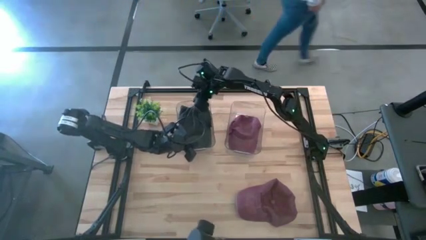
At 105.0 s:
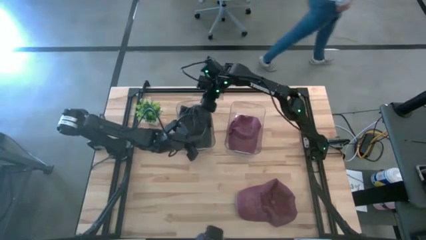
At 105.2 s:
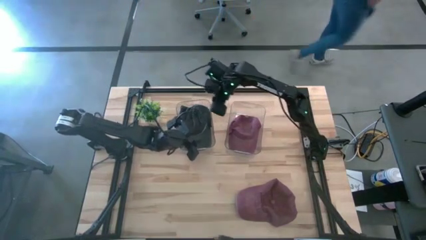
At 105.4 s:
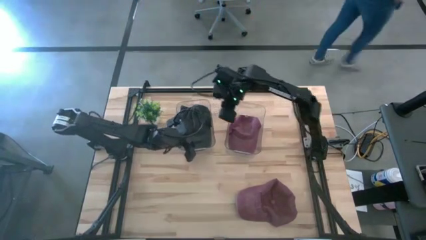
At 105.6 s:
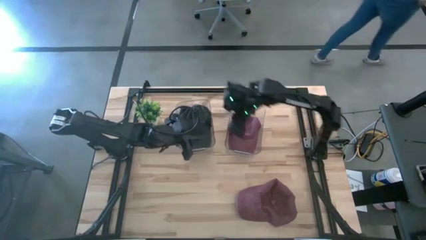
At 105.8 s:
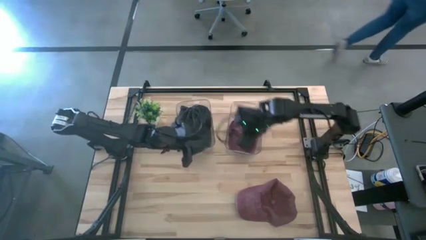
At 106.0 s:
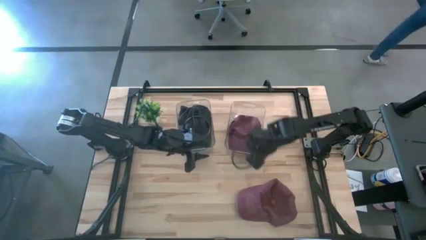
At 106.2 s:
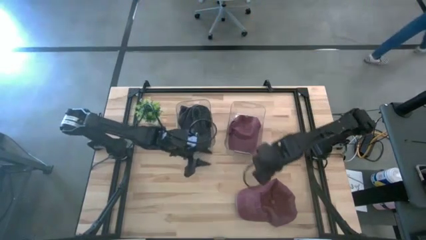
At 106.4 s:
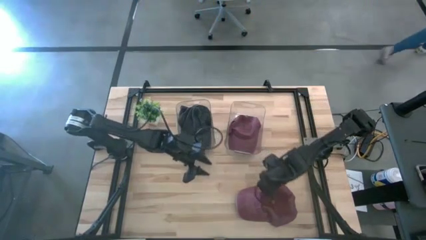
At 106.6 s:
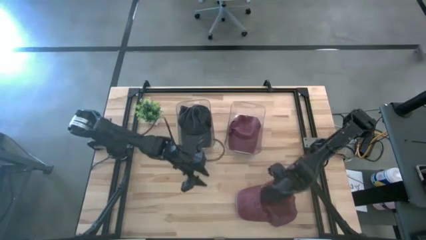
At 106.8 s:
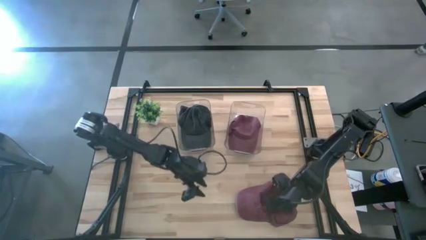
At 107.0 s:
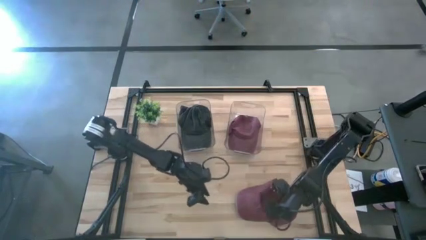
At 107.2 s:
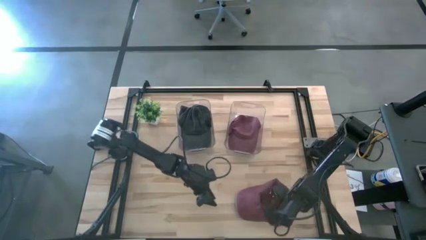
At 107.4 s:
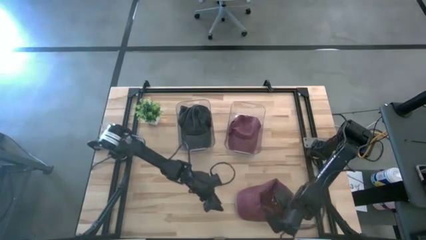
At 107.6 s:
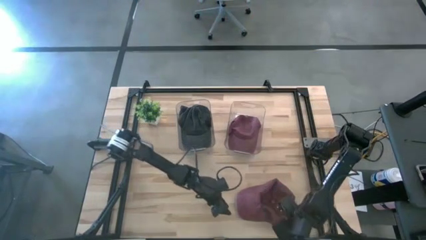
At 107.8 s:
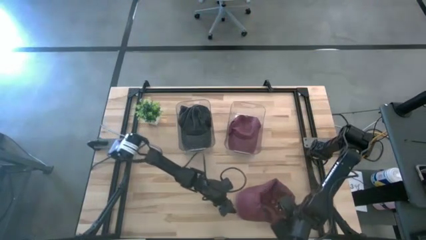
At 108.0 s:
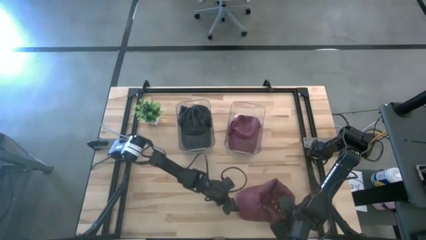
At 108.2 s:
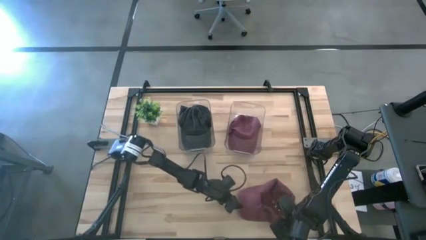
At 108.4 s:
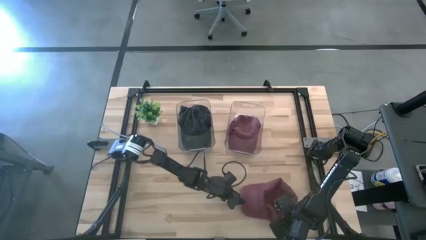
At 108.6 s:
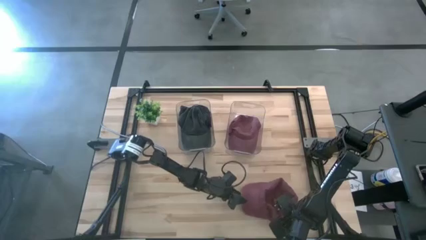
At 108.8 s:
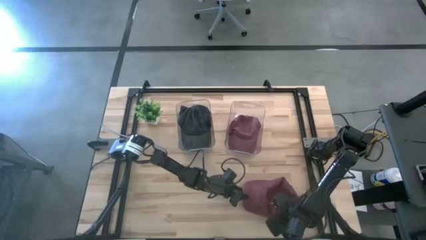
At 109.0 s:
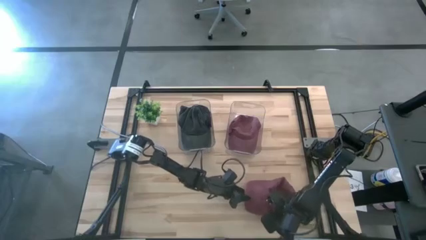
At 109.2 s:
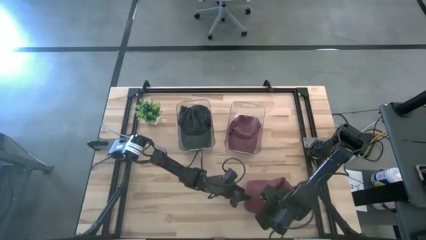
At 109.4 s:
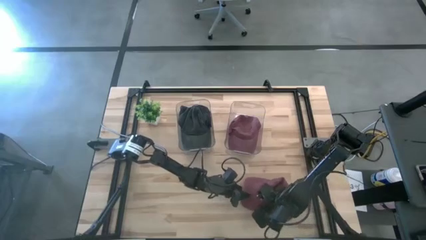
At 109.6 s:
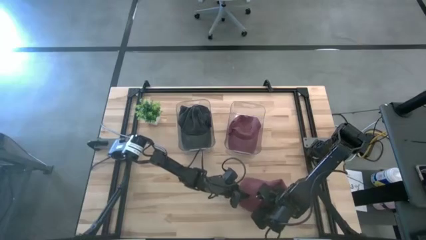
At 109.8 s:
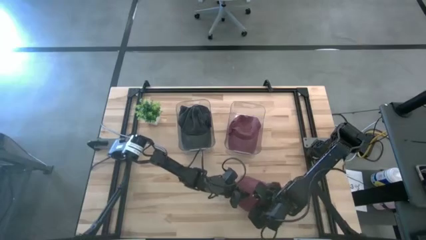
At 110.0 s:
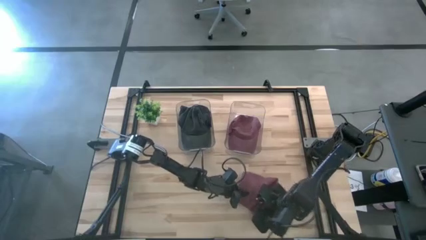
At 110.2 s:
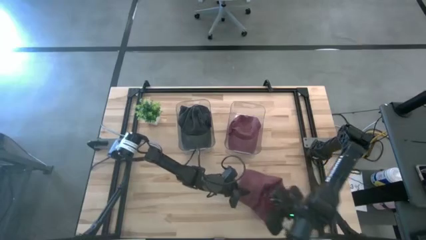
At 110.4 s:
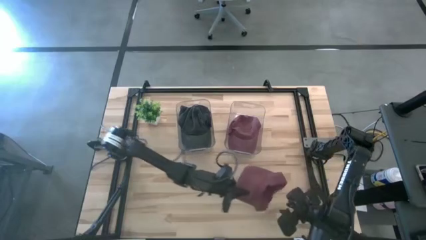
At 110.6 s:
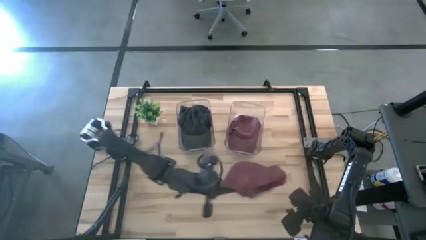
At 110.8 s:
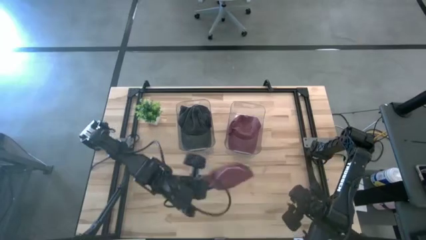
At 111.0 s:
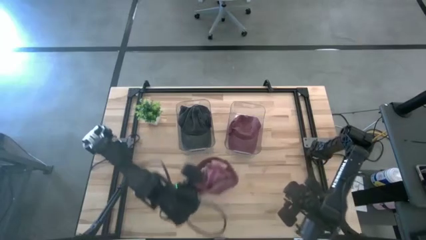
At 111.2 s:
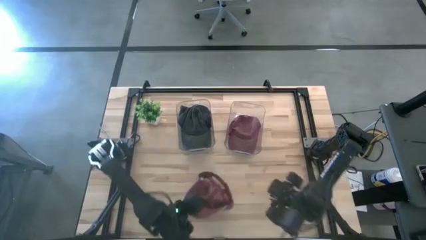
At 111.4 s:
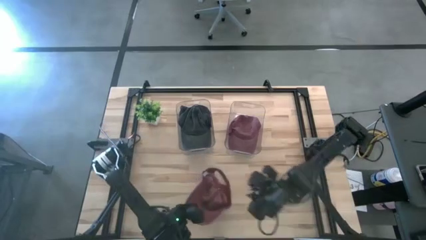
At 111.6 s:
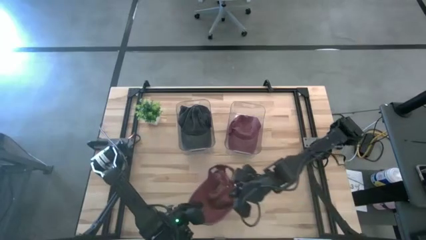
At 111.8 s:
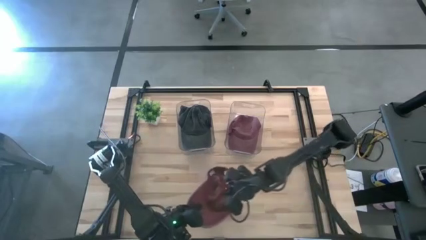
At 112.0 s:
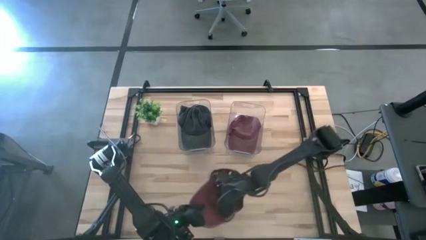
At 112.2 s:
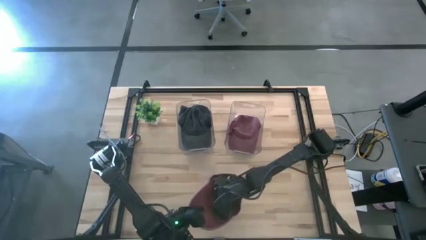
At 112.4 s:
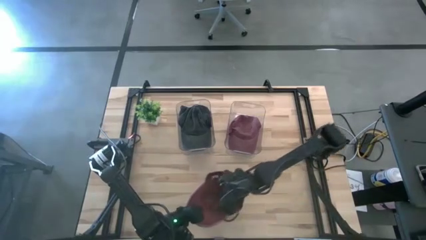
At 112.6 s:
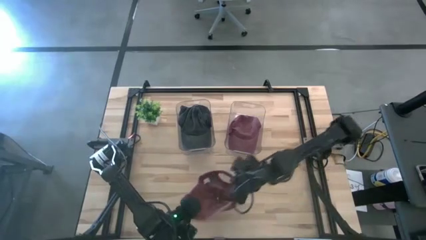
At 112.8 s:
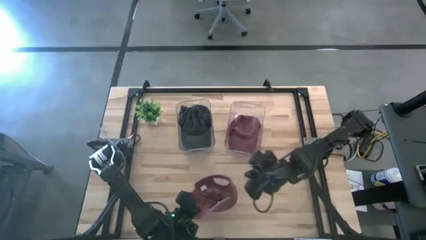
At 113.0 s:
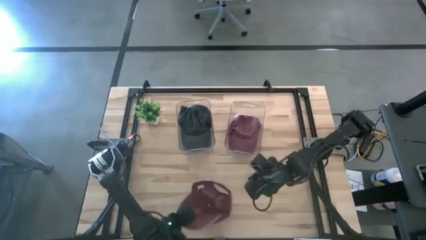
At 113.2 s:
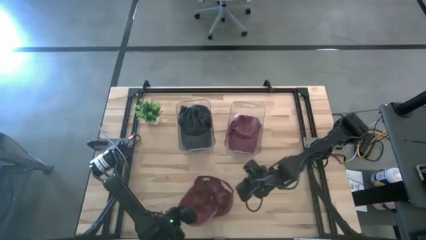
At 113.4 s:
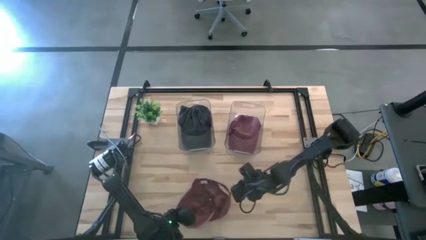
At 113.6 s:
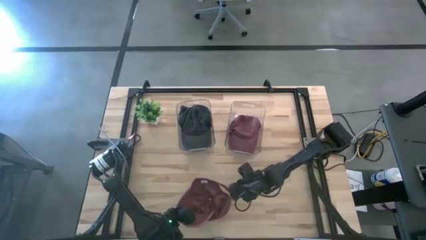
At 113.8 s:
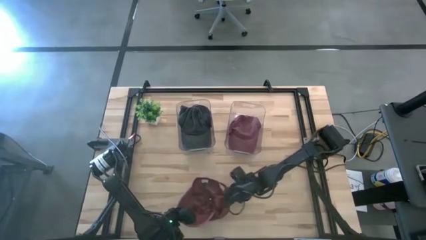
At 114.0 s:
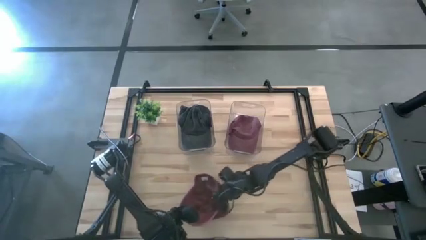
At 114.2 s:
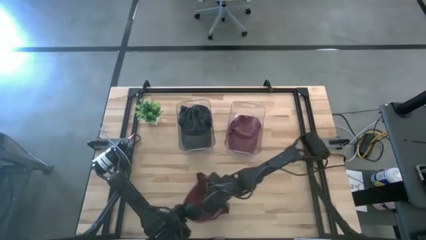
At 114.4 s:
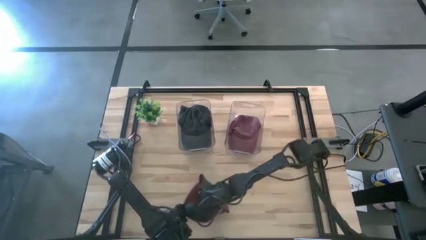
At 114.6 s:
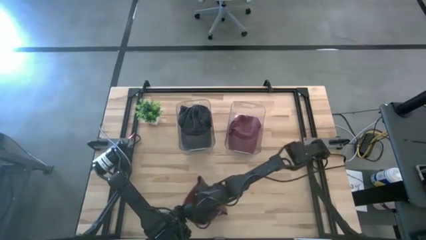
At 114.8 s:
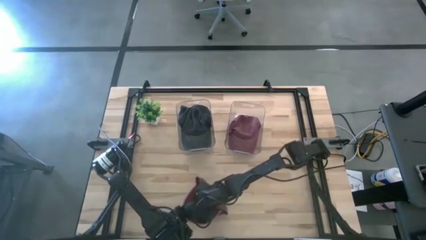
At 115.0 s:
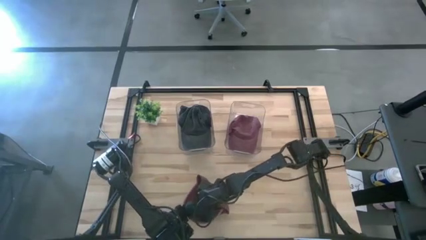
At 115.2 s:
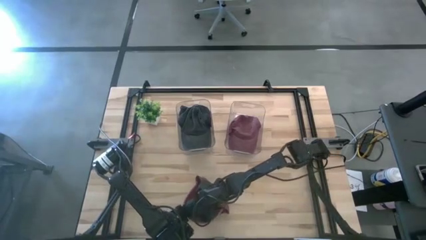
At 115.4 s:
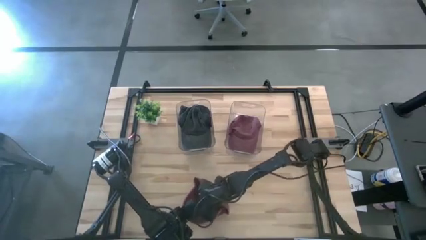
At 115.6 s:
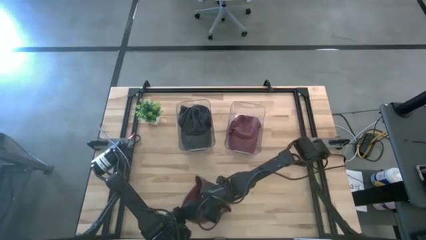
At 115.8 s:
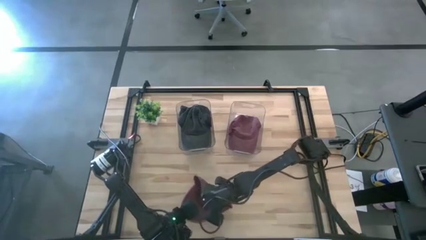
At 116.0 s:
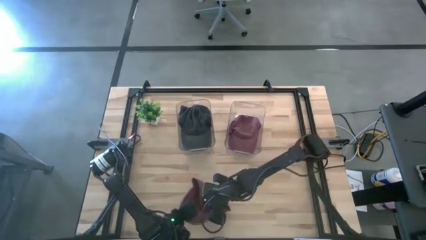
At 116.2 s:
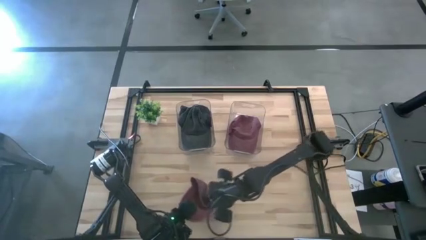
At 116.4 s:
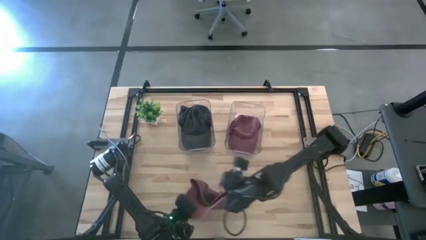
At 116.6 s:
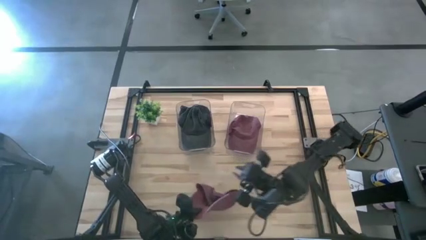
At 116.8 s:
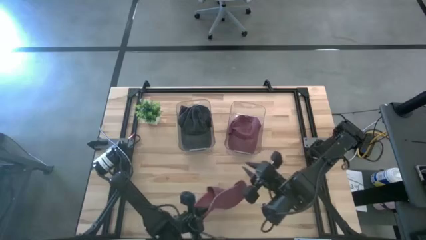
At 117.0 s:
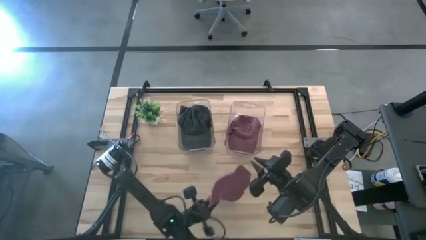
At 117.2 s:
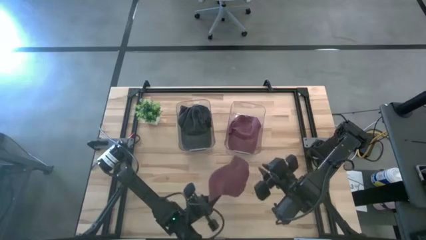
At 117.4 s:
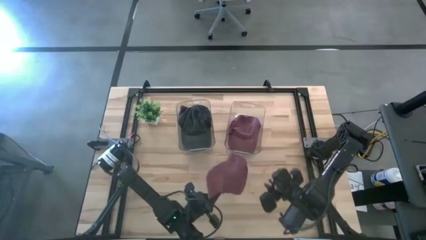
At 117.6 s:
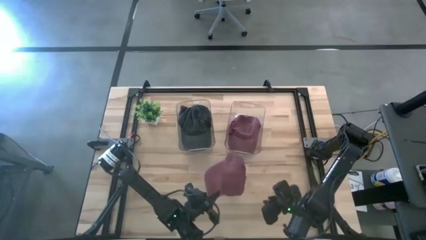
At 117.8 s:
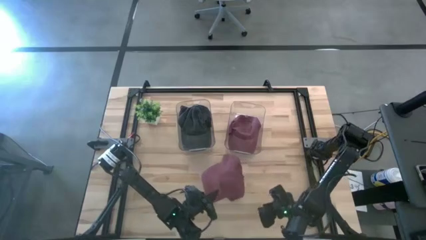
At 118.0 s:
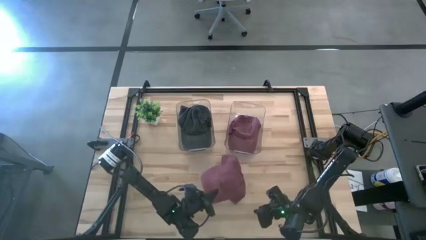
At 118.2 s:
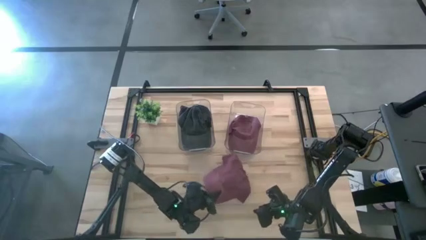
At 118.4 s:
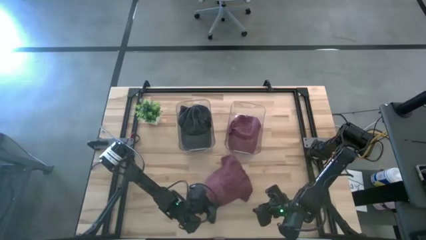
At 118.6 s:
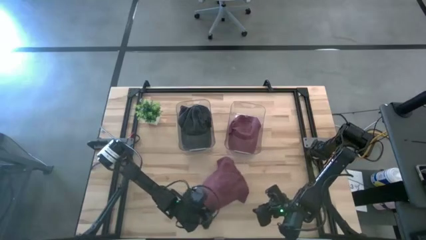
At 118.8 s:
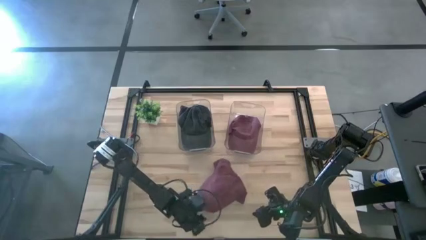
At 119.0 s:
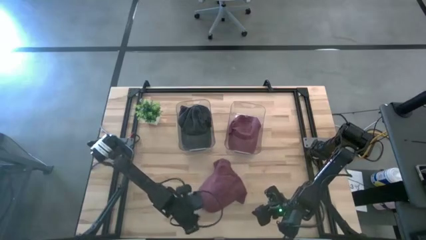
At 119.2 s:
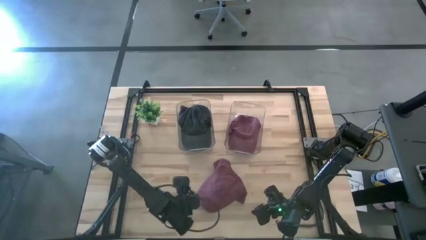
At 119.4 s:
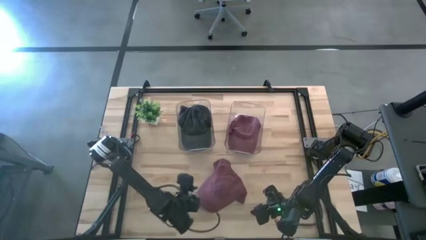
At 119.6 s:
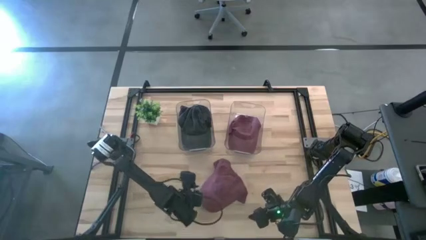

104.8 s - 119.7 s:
Task: Pick & Place hat
Put the red cap into the right transparent bin

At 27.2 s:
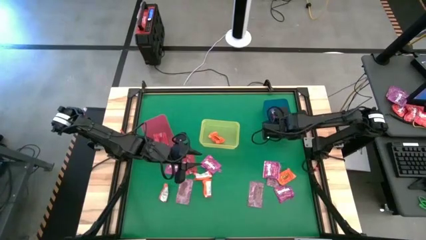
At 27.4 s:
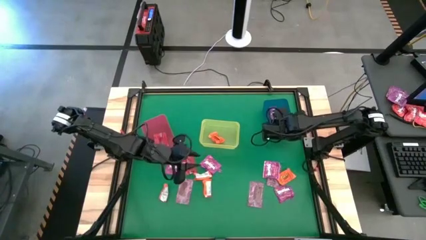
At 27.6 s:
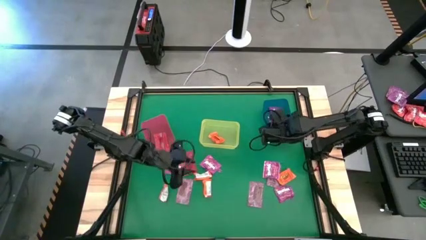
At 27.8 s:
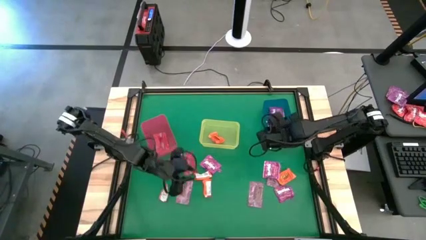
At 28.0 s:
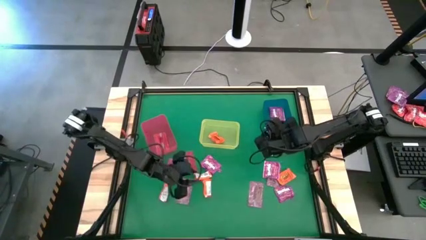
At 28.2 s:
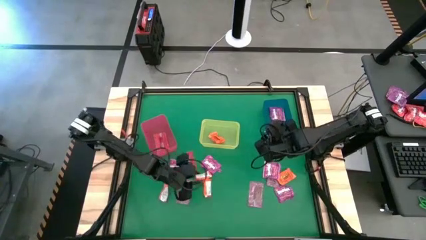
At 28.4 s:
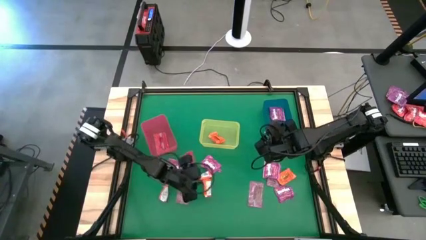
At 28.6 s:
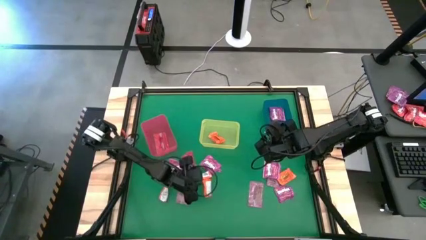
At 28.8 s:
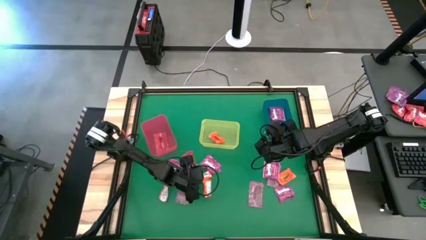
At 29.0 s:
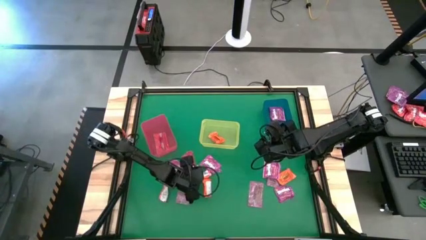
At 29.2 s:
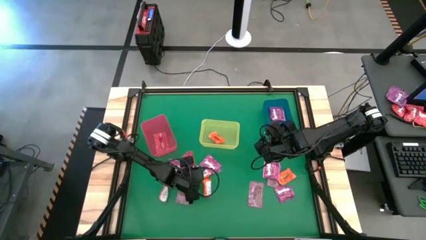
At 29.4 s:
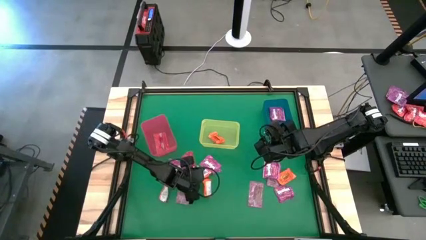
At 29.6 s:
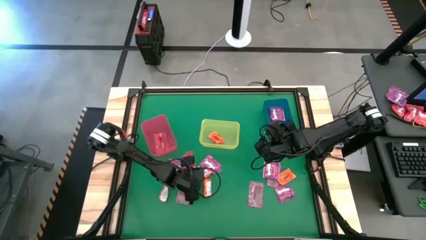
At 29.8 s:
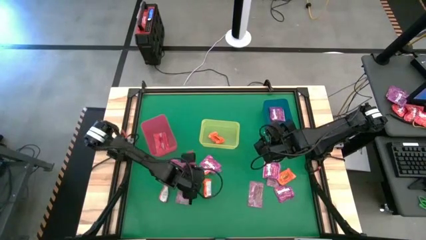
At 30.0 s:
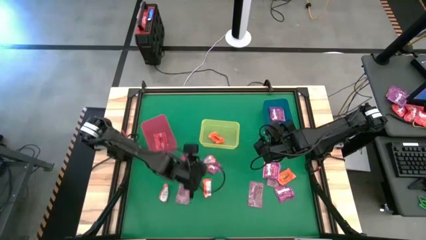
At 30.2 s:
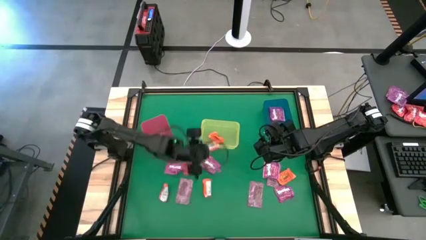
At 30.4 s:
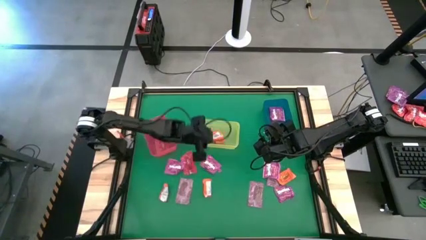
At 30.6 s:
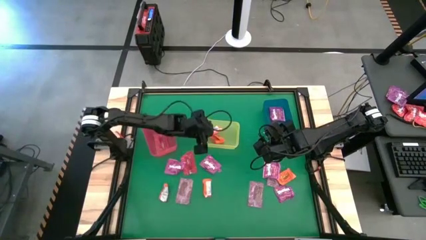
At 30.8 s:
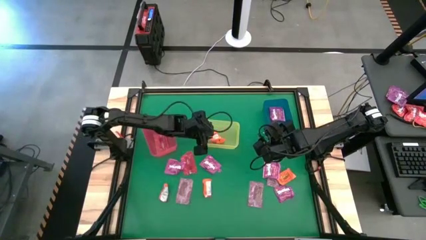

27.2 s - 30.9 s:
Task: Sort candy by brand, put in halloween buckets
Put the orange chocolate into the yellow bin
